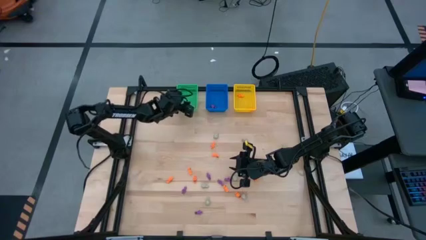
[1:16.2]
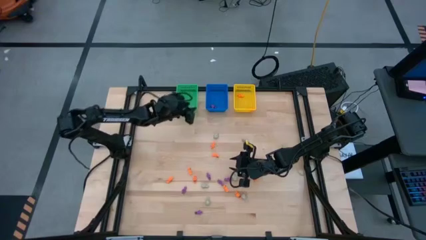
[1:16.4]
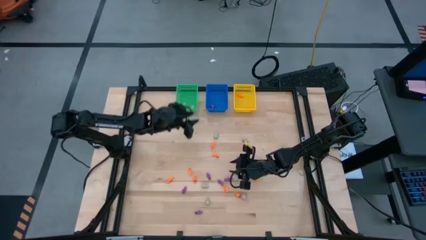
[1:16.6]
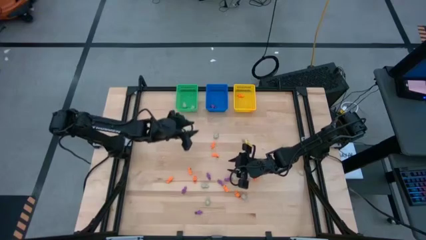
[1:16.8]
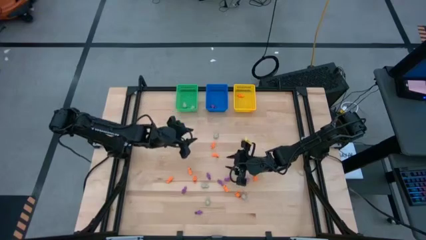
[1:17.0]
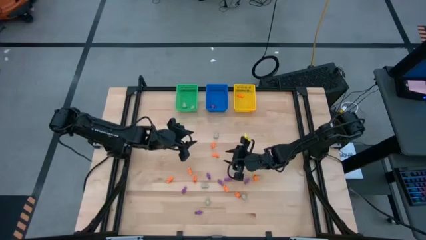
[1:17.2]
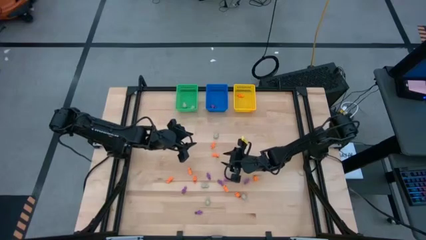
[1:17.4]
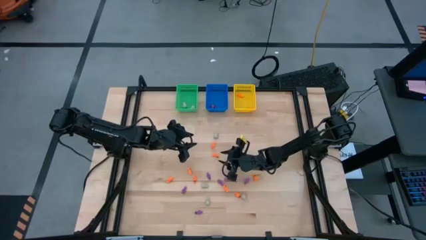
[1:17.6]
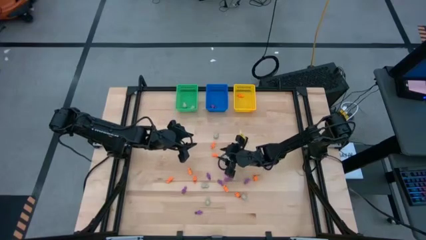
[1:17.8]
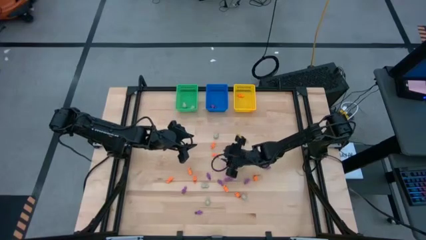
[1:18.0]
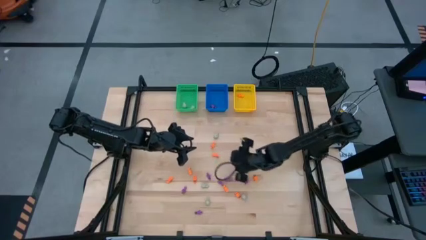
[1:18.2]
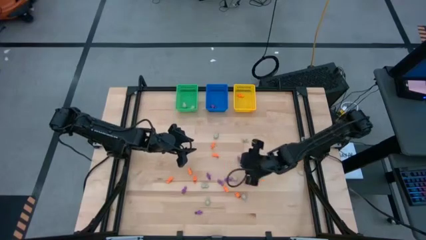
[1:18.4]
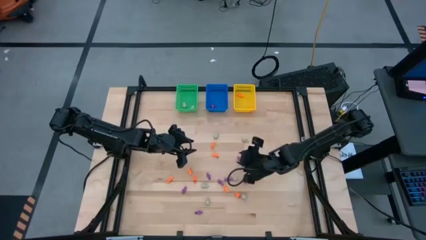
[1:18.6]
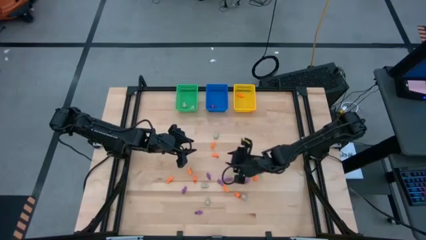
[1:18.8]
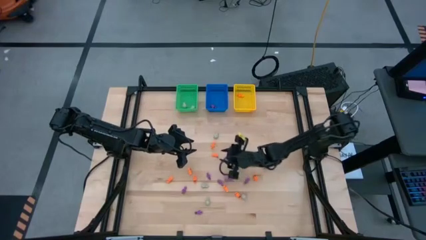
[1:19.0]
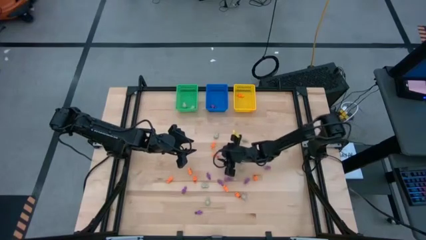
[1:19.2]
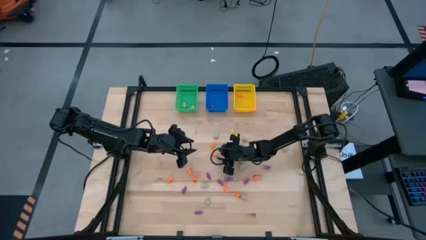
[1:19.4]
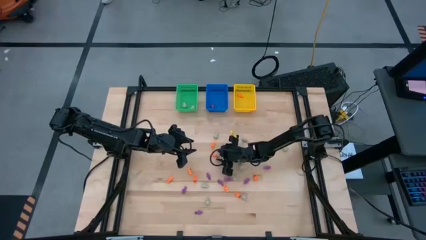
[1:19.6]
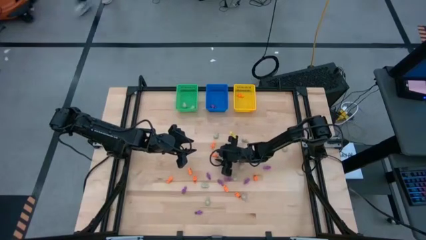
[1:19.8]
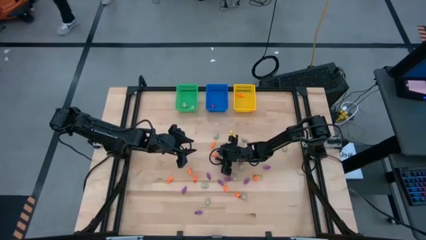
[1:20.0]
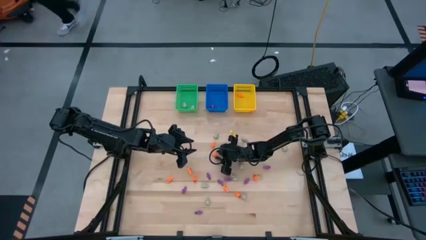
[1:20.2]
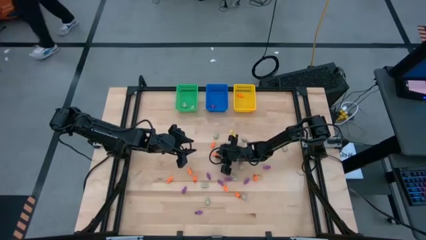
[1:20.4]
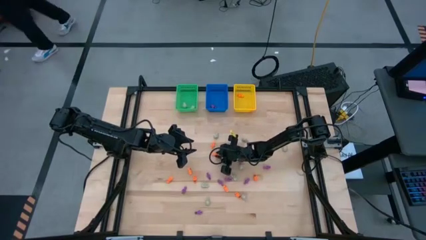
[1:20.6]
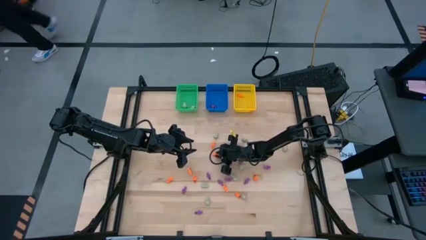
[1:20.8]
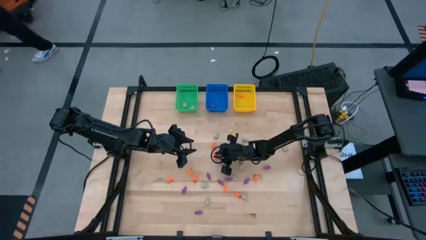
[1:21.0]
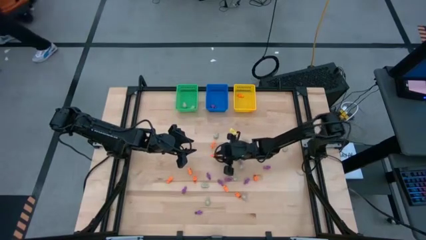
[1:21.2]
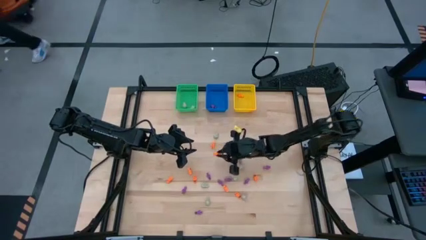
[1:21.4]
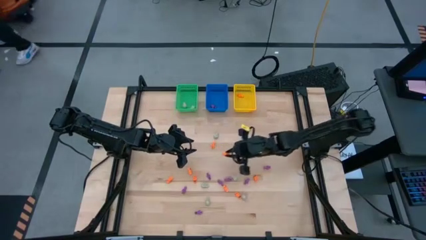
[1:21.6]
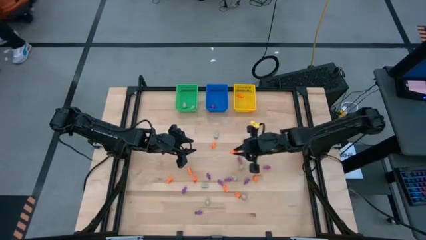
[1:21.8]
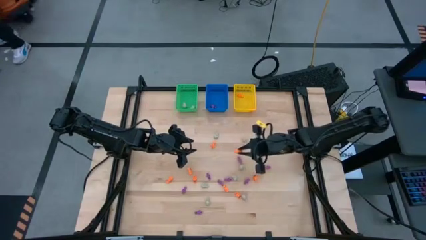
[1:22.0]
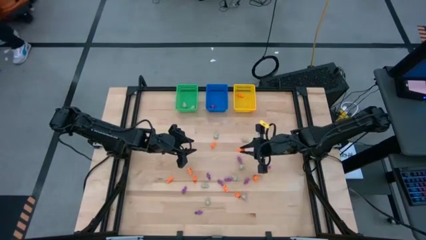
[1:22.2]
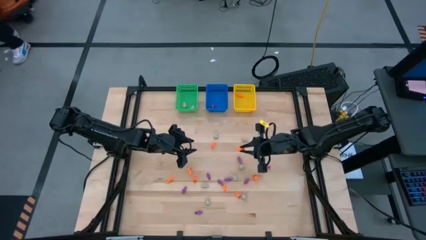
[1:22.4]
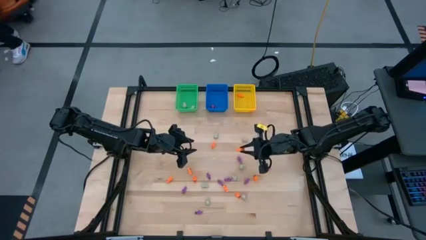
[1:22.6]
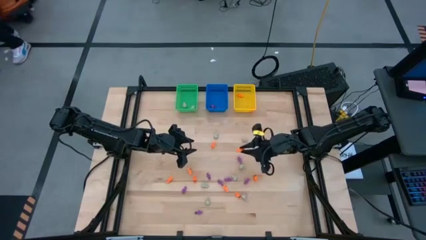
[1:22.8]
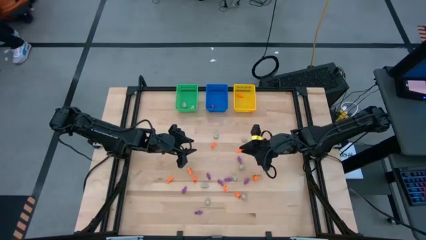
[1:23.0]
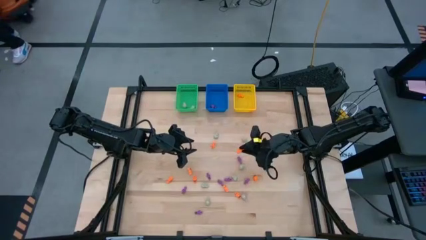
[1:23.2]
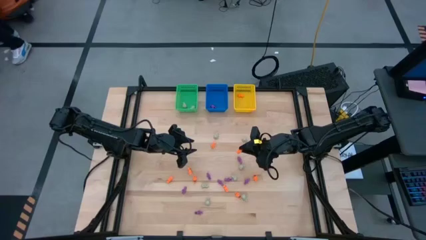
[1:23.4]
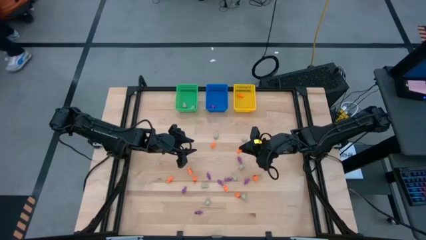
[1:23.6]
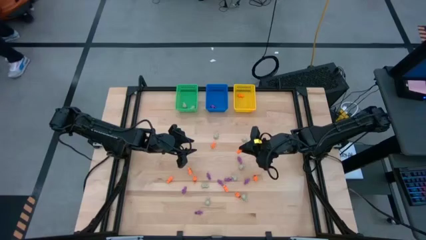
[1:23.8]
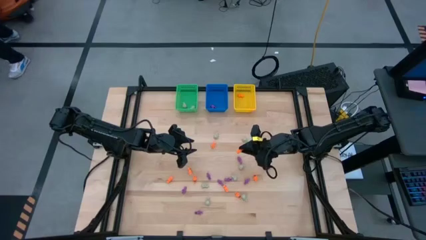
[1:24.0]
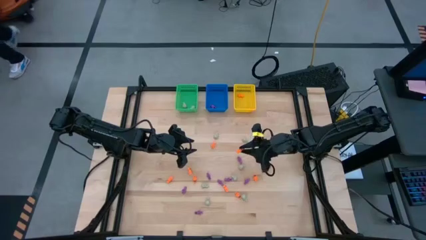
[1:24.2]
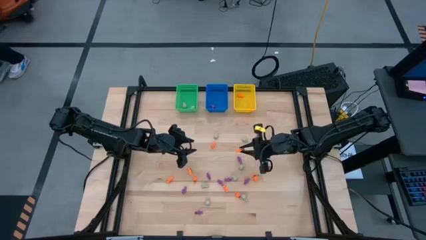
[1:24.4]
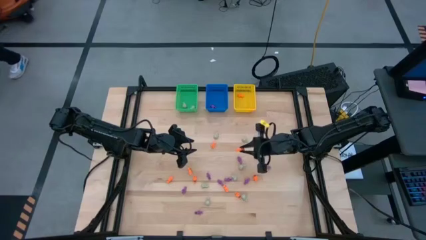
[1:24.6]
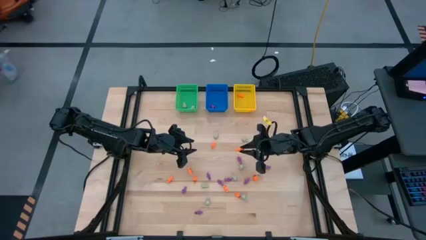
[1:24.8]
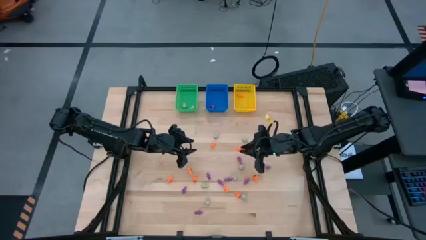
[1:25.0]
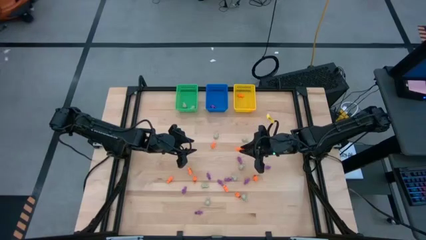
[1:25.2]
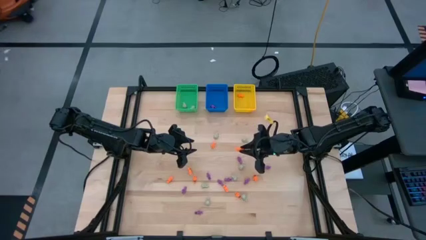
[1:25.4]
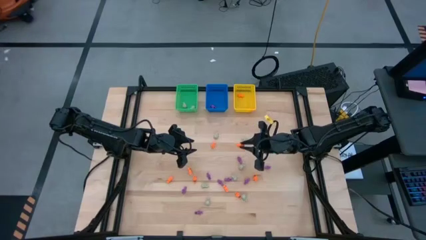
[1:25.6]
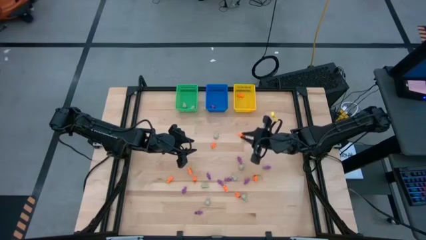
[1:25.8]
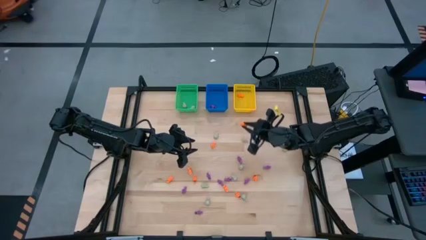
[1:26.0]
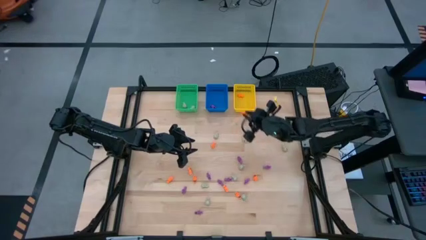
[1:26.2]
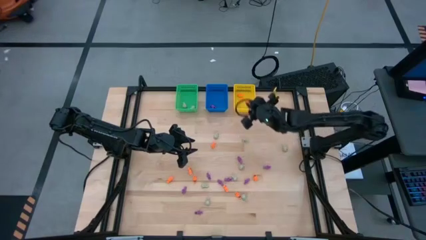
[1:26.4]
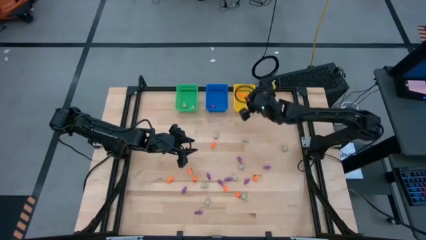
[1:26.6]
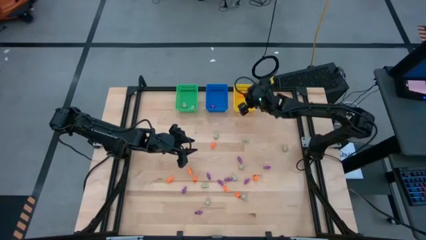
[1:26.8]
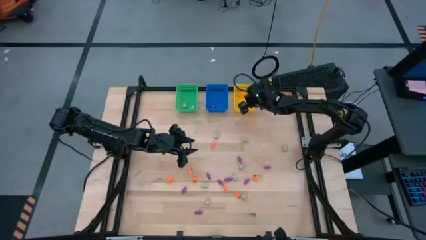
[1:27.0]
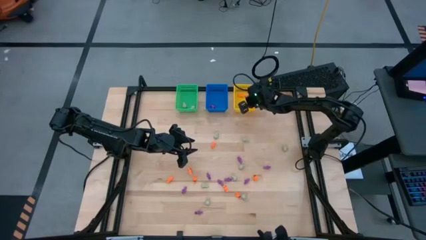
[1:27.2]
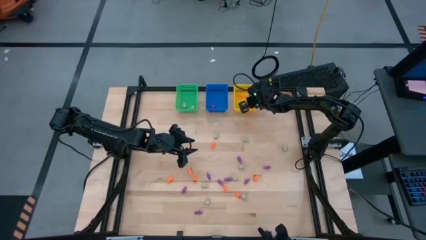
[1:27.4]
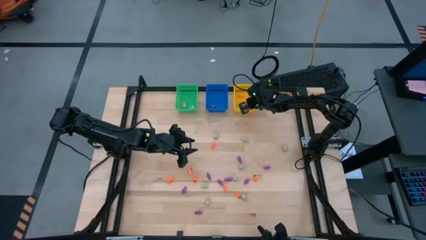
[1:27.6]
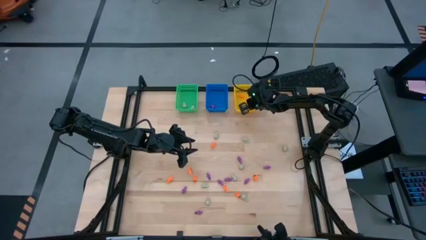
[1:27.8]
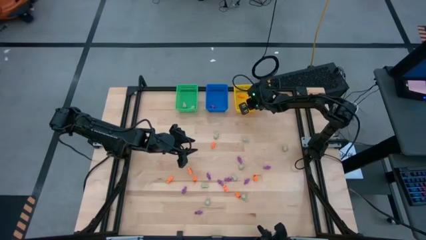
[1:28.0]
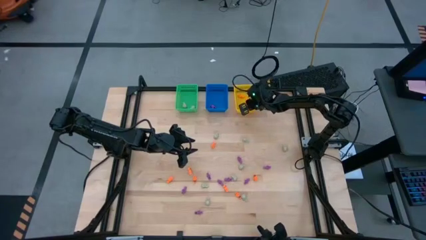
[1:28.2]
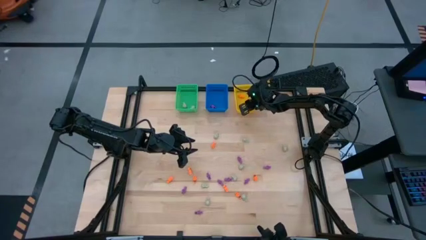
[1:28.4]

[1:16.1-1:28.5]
Task: Sort Halloween decoration
Put the orange skeleton toy into the yellow bin

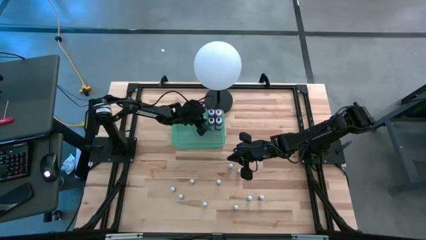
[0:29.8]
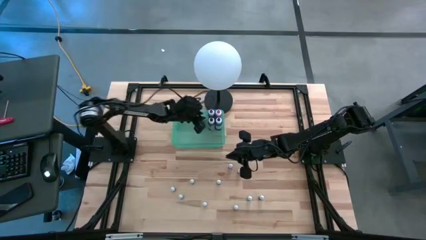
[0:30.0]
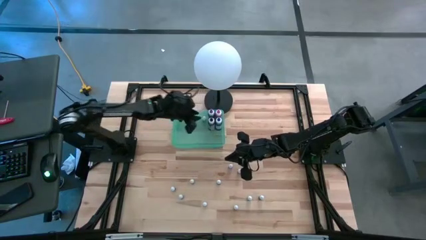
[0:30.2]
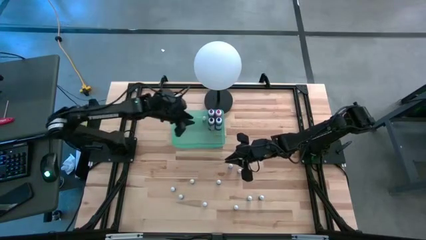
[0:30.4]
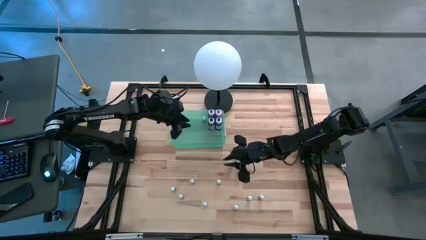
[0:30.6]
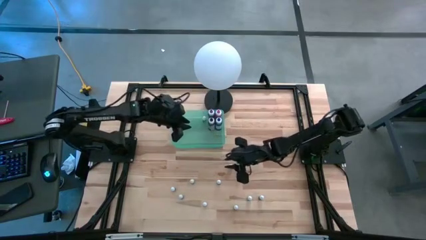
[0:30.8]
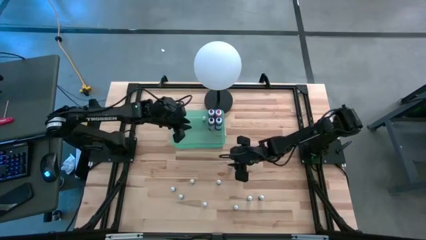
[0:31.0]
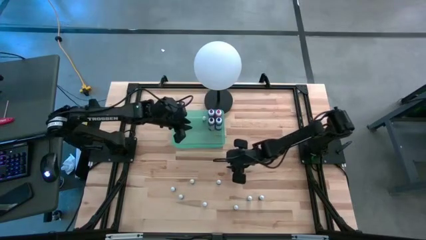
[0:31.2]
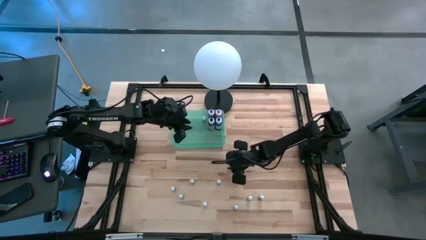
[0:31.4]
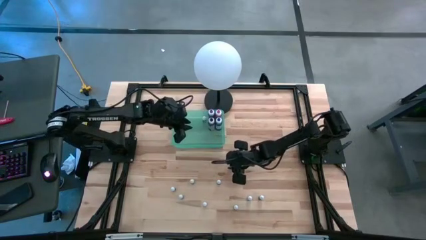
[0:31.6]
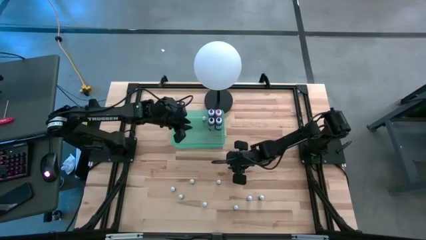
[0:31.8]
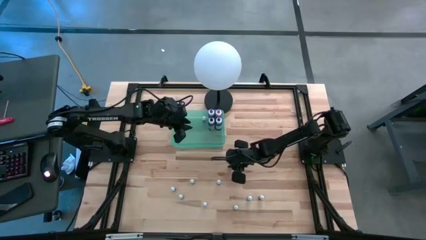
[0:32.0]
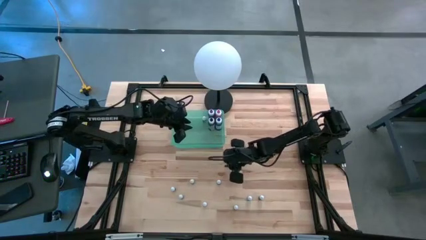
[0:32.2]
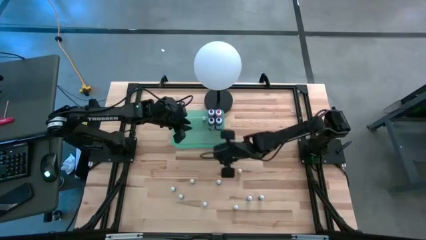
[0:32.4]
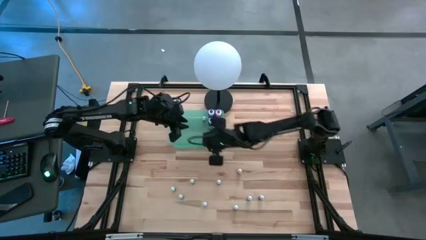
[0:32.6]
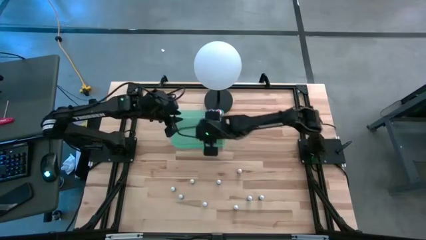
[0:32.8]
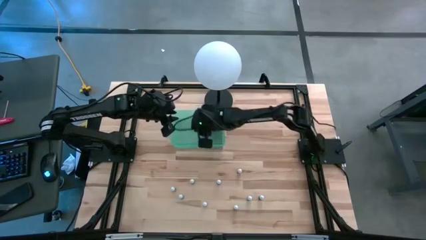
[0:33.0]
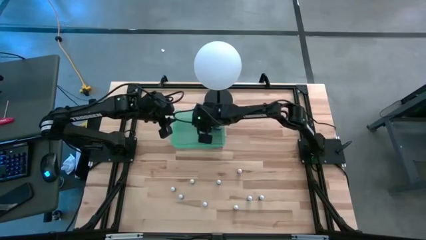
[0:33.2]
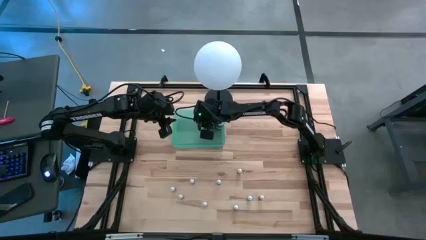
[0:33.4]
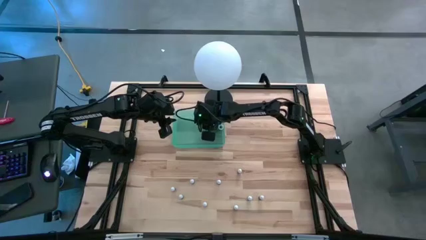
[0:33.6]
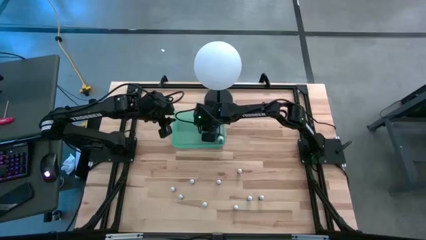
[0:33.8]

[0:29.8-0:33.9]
Task: Pick & Place food coloring
Put the small black food coloring bottle into the green bin
